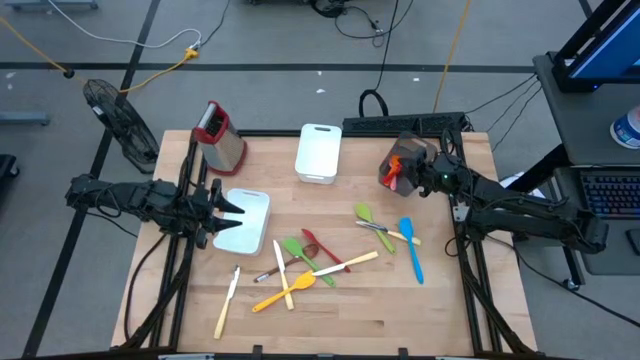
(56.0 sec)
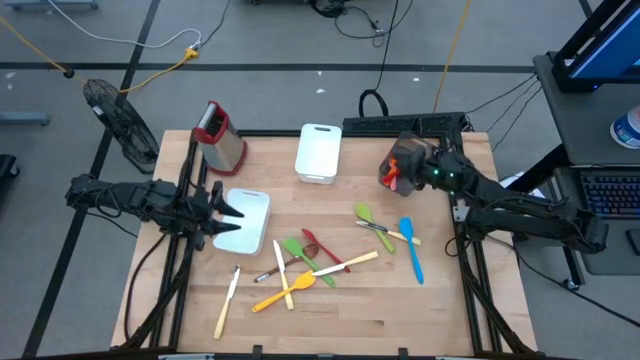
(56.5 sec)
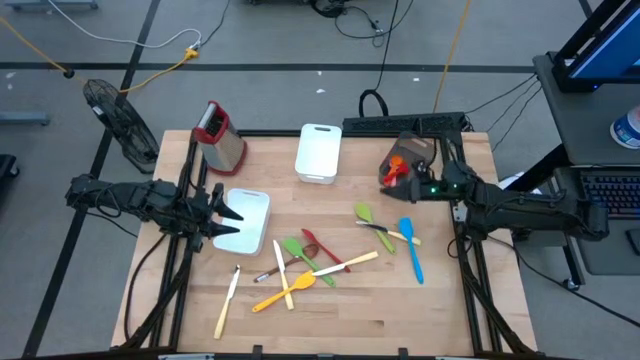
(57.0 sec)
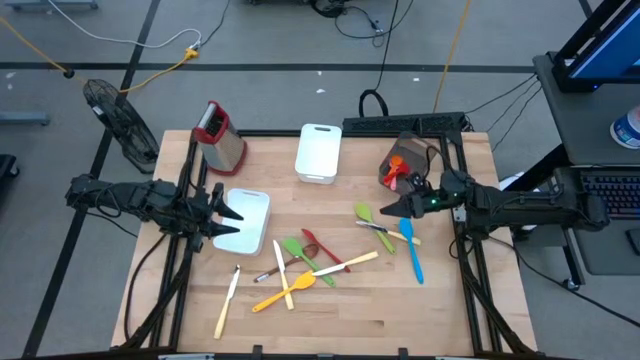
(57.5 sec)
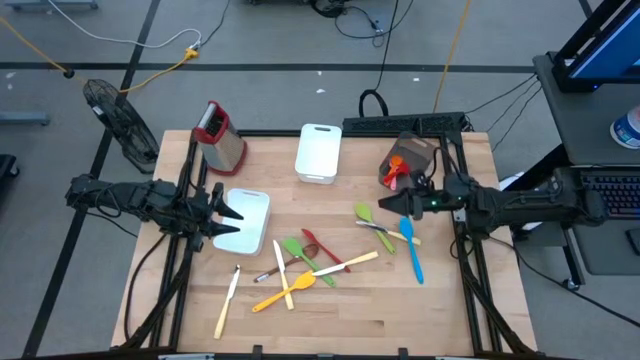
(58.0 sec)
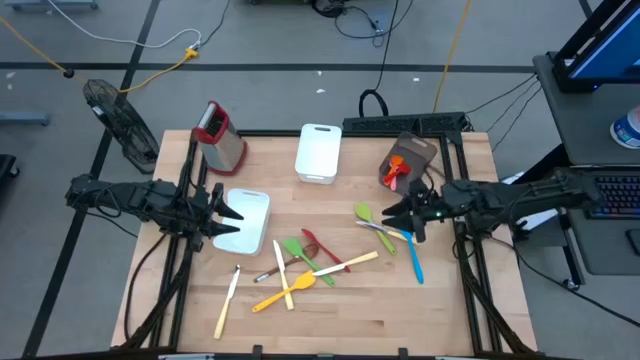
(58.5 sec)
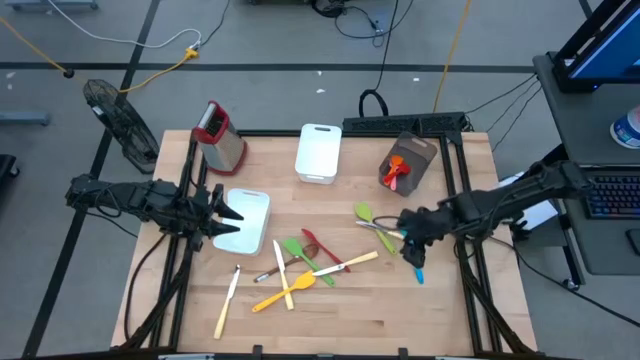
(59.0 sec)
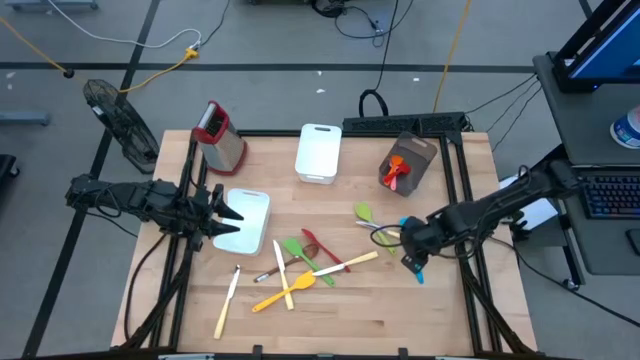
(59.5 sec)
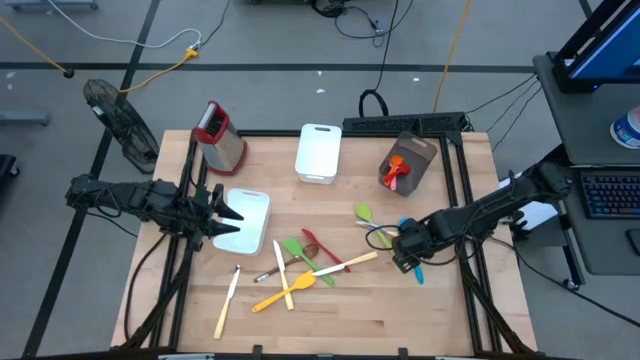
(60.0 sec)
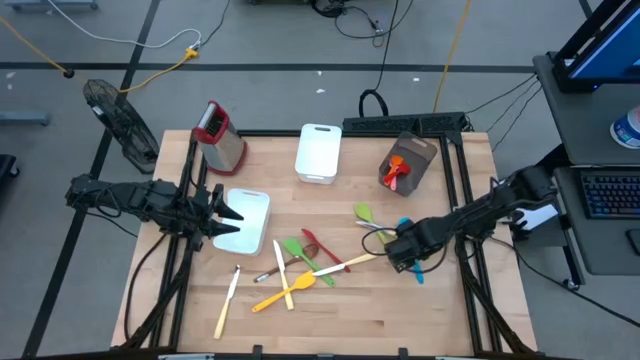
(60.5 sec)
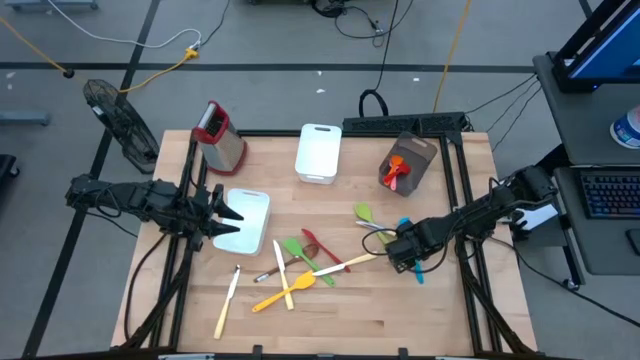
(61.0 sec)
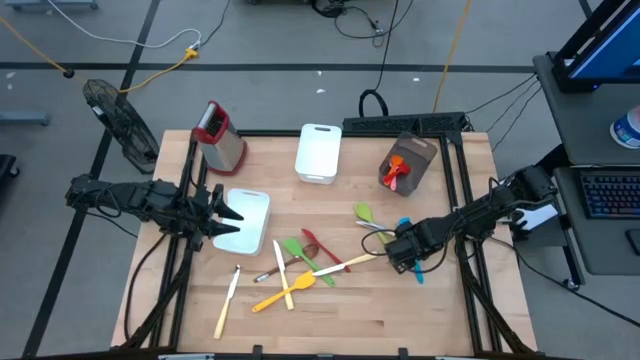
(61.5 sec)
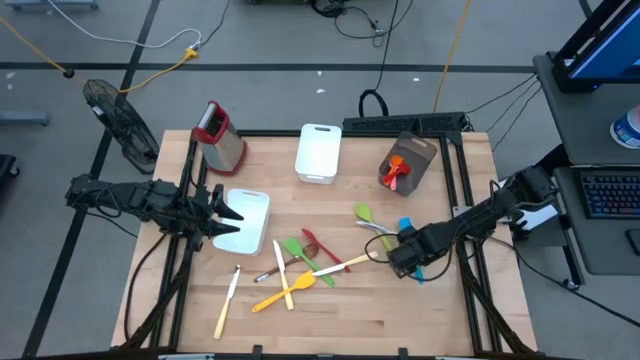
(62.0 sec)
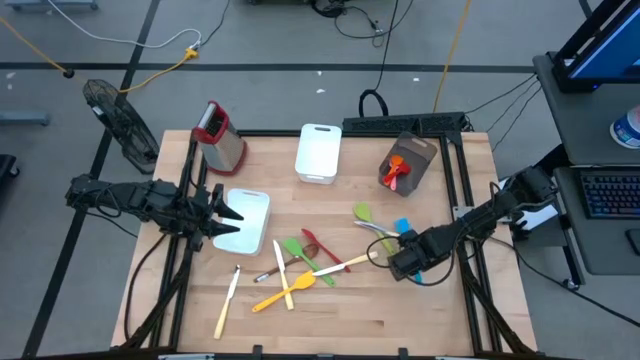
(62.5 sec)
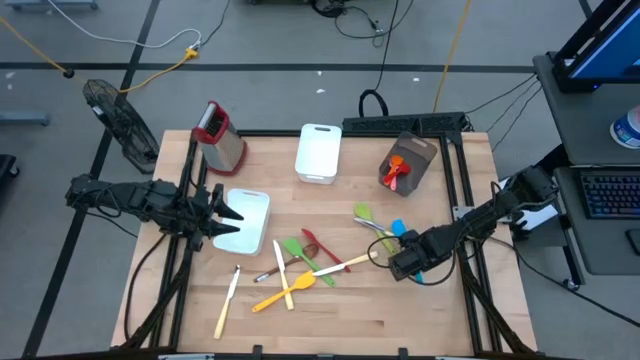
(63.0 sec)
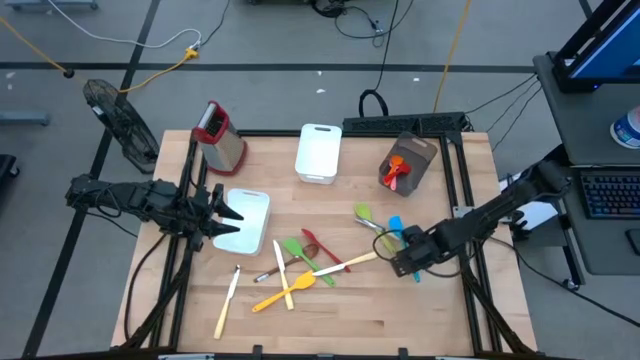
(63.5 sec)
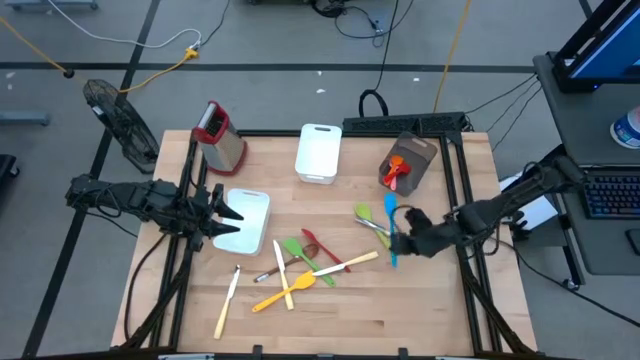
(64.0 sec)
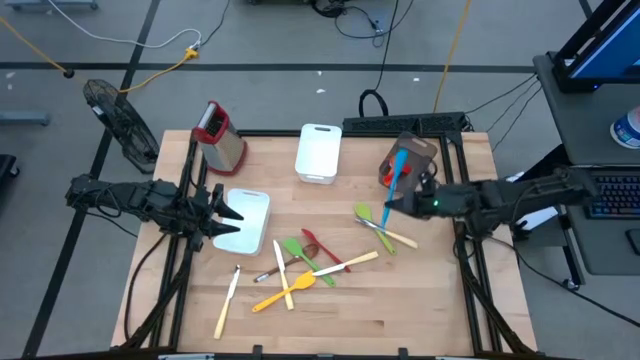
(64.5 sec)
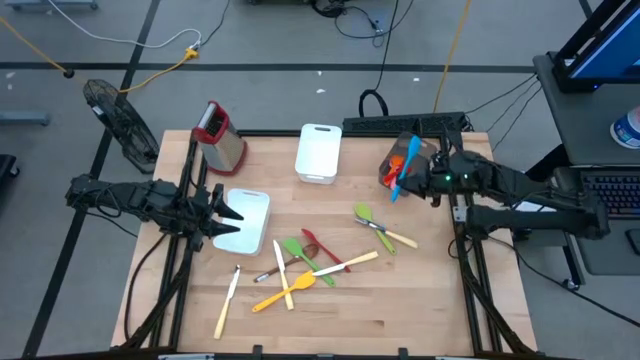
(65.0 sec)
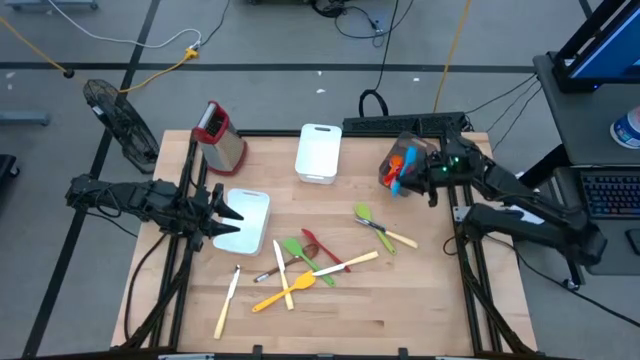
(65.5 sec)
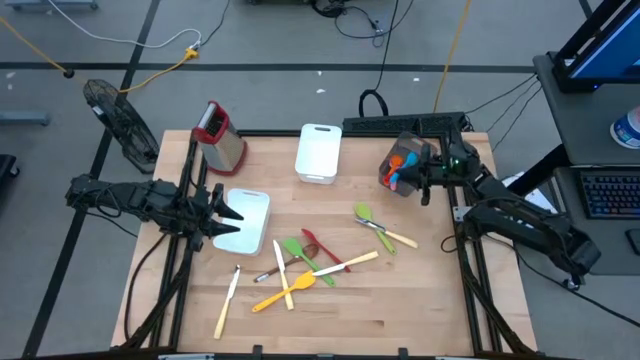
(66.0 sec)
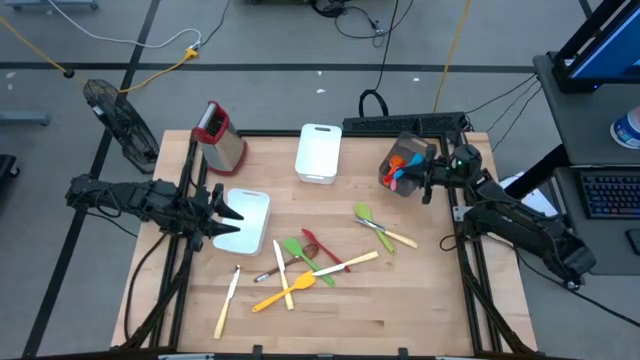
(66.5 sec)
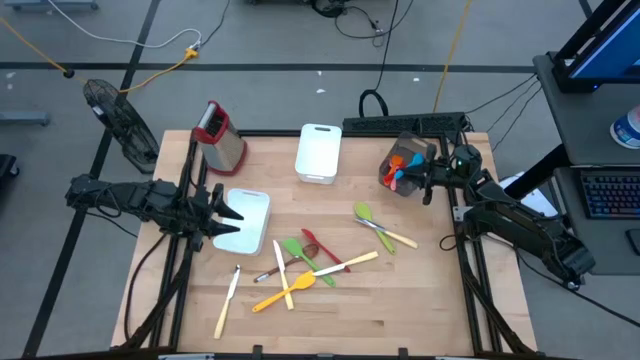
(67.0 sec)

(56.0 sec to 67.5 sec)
Task: Pick & Place Kitchen Items
Put the blue spatula into the black bin

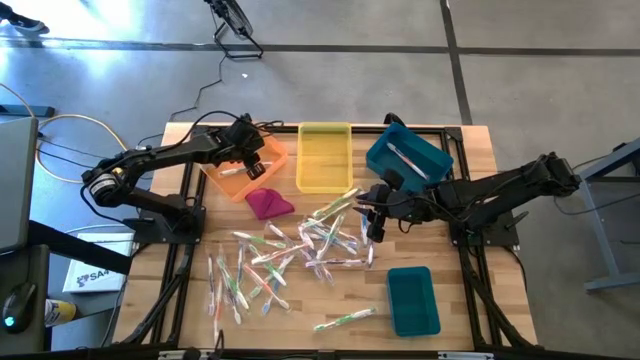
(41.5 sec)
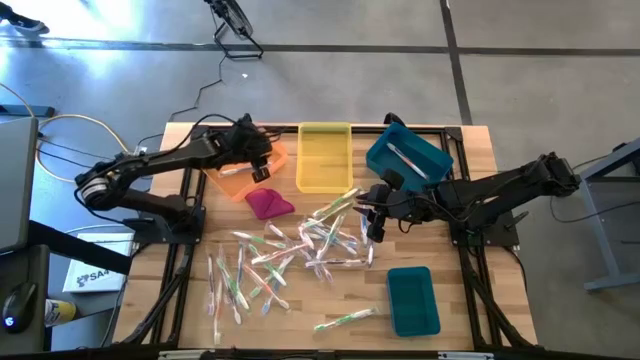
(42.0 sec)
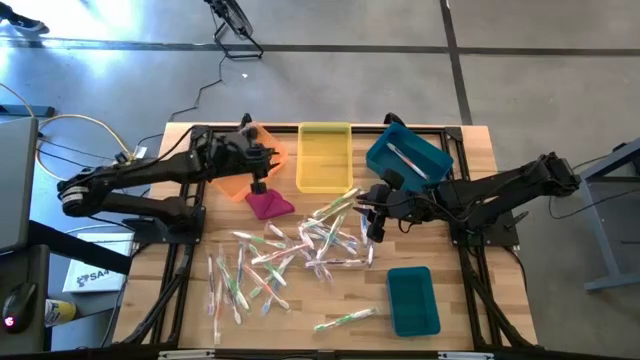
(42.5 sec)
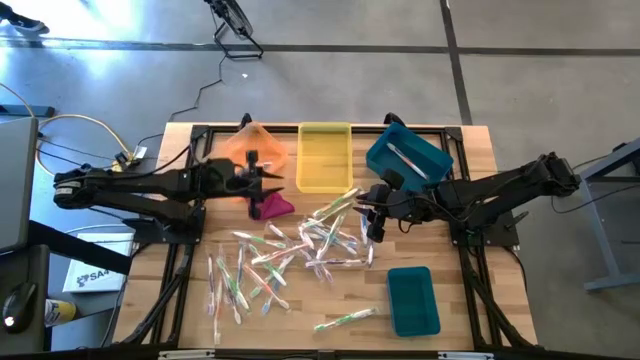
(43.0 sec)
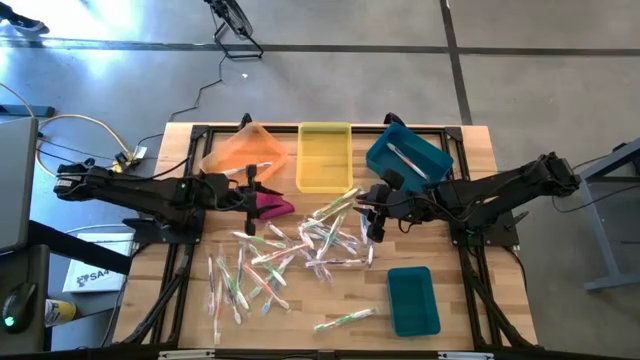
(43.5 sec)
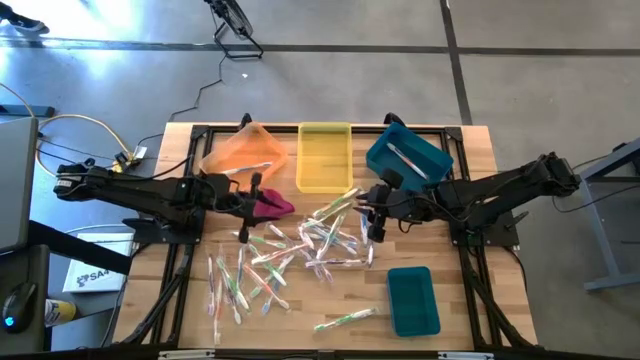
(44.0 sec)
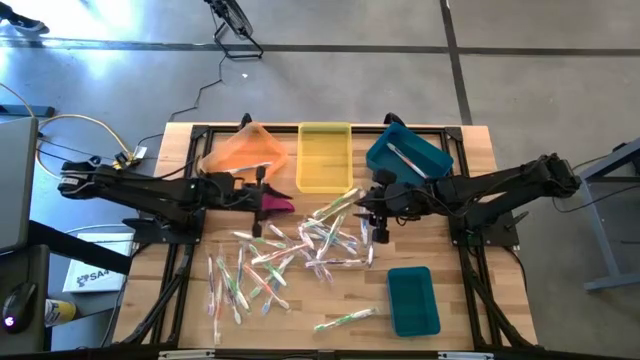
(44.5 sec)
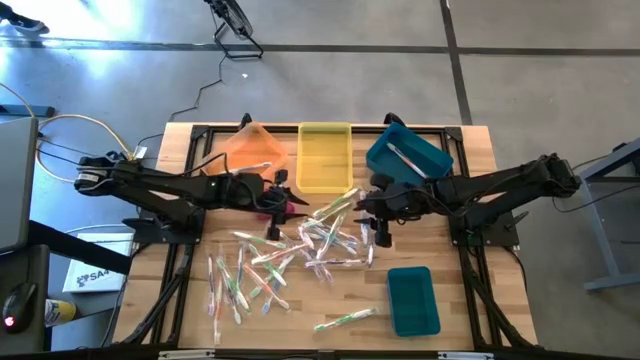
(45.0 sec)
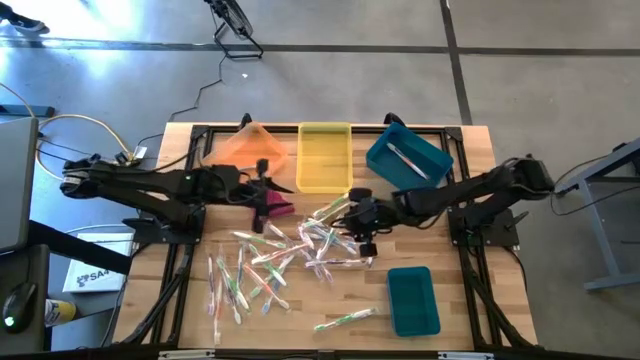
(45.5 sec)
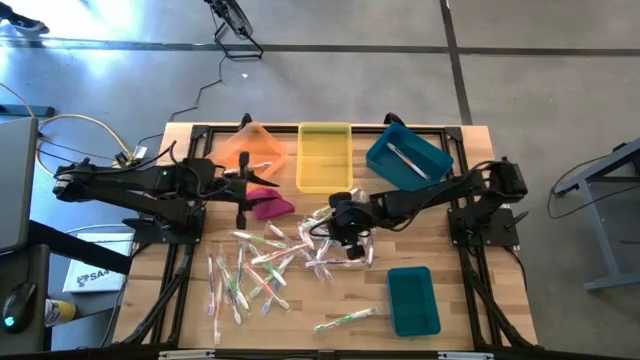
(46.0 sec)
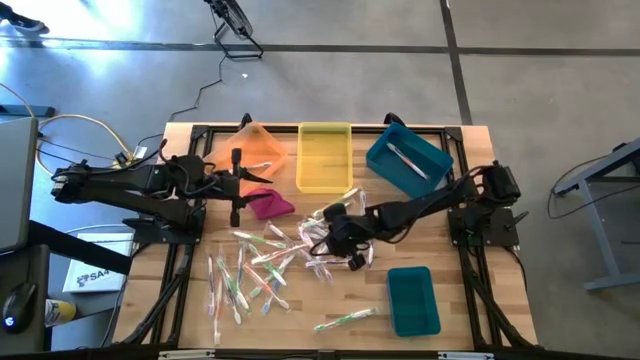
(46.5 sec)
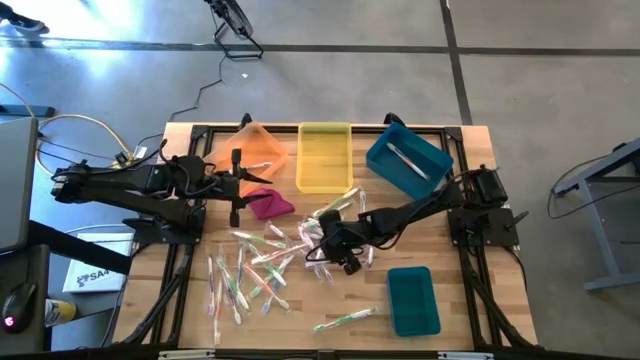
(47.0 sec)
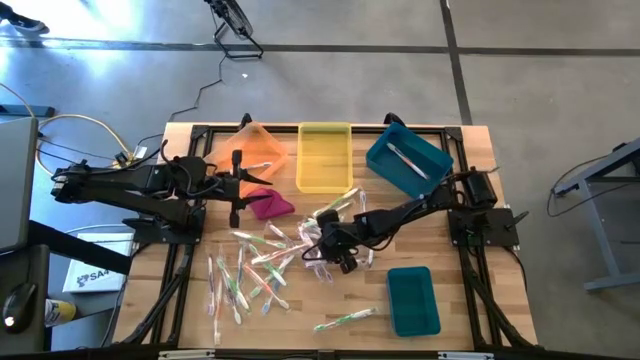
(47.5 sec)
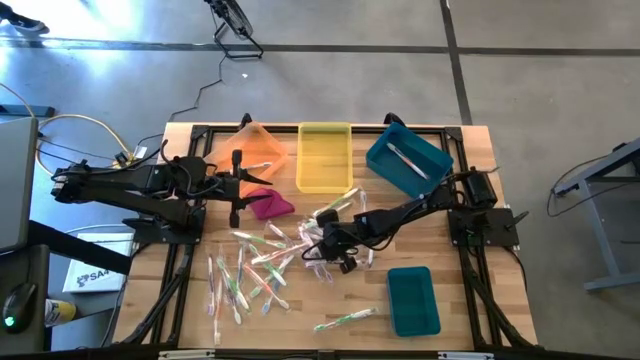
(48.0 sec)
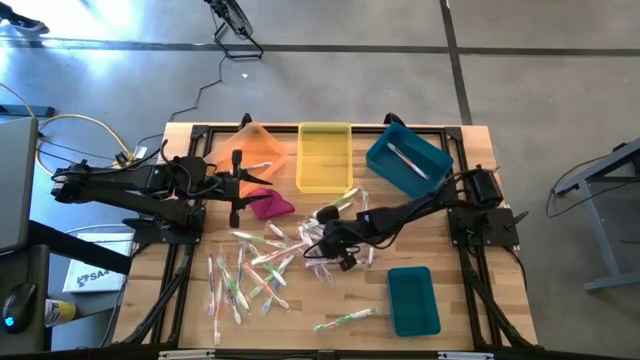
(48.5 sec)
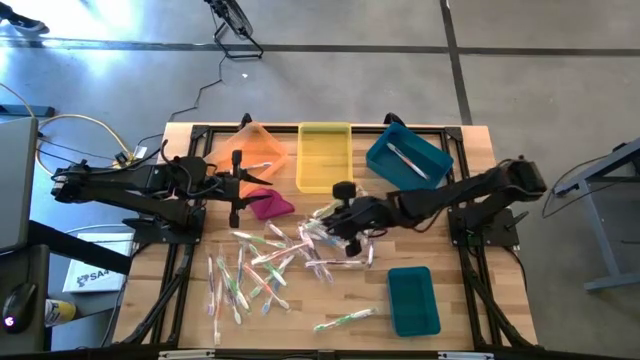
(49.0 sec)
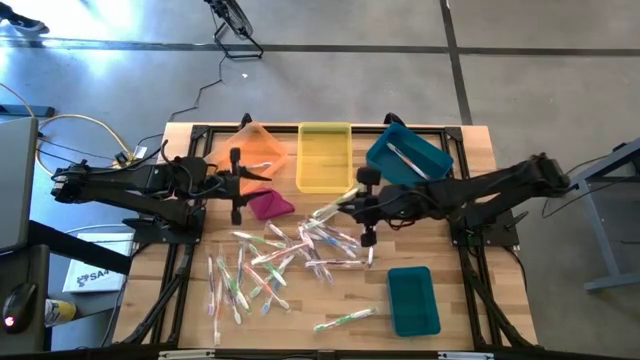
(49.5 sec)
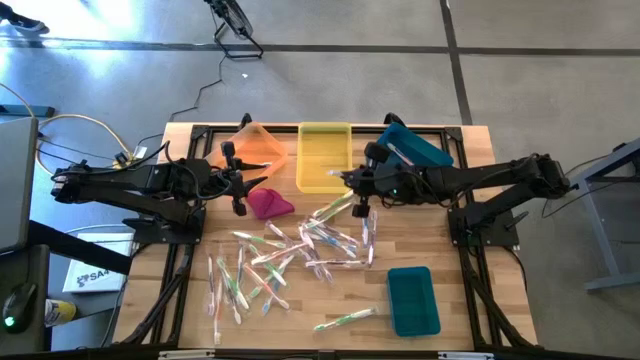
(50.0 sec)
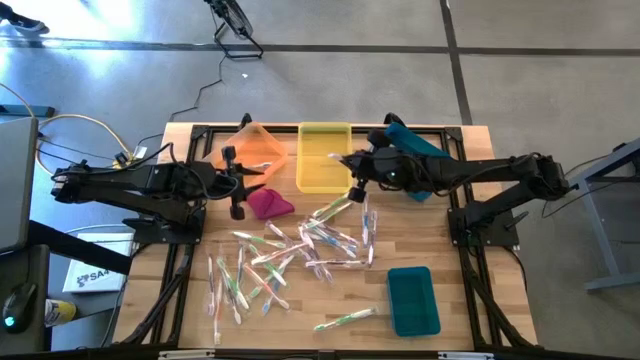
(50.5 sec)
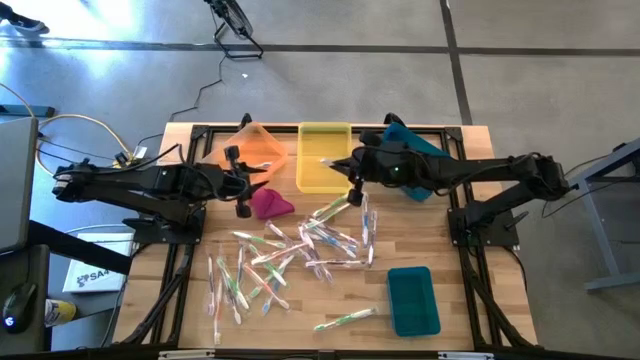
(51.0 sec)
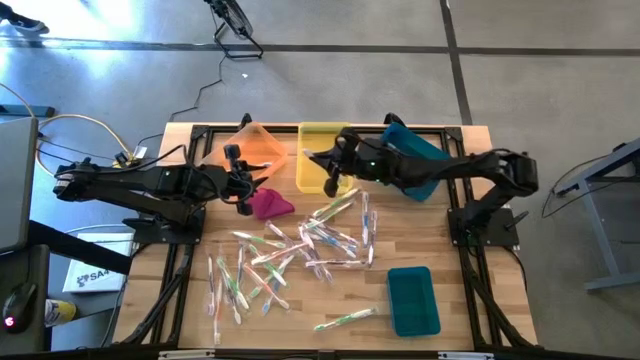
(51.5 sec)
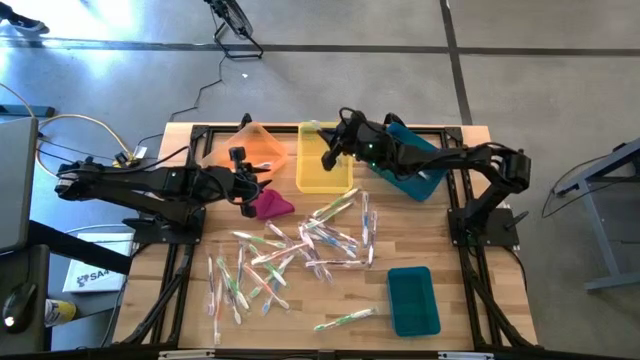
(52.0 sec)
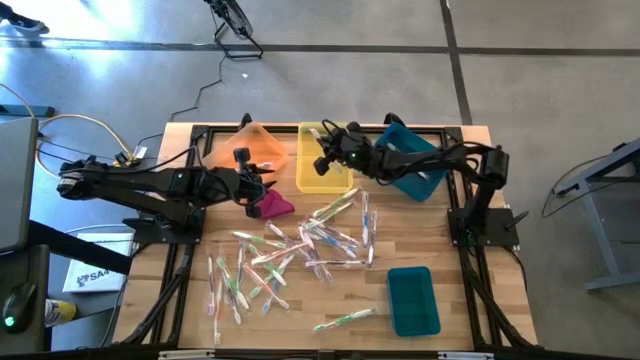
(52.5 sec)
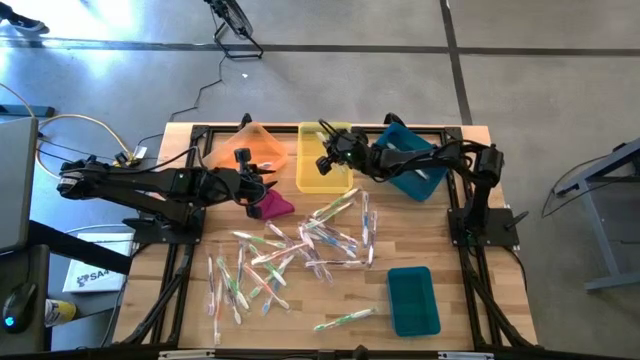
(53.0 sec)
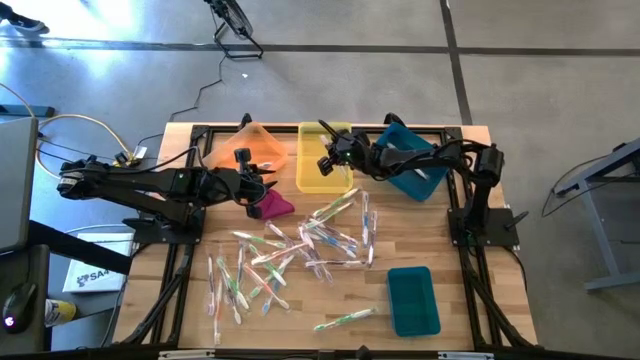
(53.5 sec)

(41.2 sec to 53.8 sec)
Task: Pick & Place Toothbrushes
Put the green toothbrush into the yellow bin
